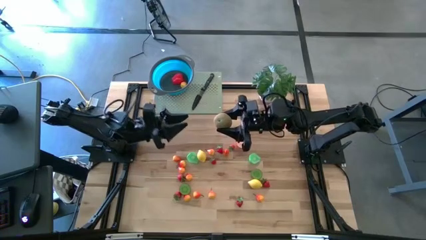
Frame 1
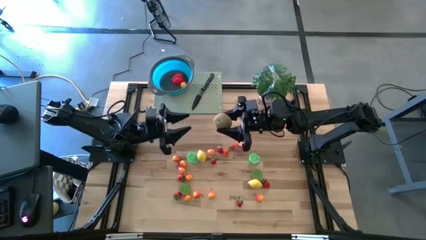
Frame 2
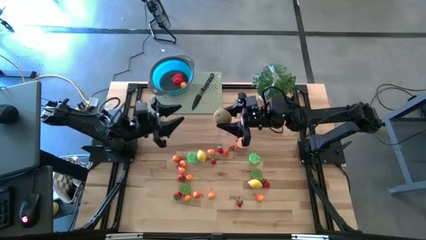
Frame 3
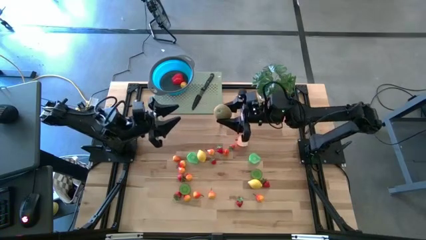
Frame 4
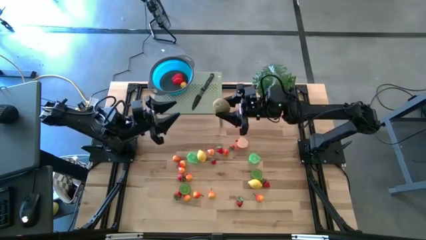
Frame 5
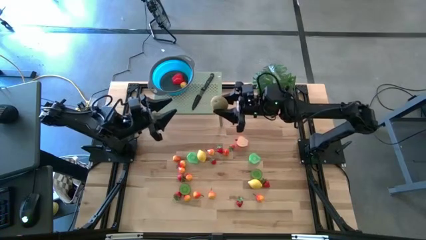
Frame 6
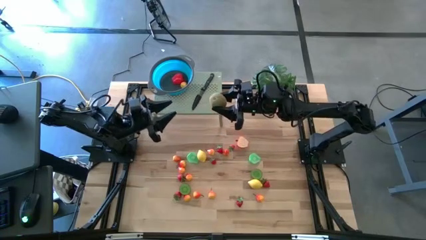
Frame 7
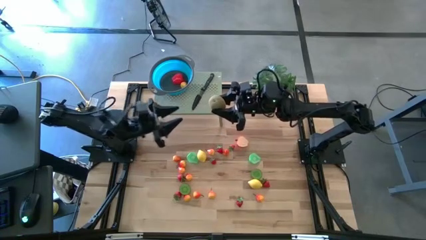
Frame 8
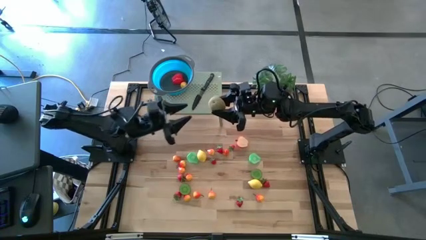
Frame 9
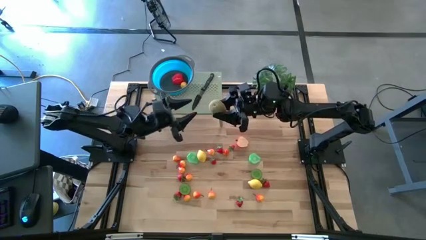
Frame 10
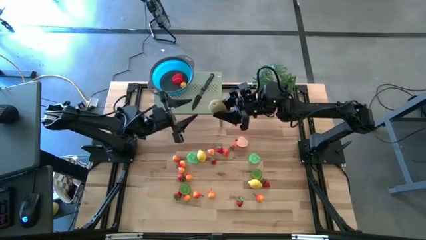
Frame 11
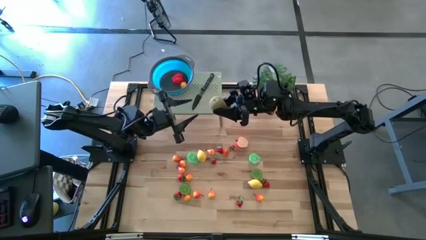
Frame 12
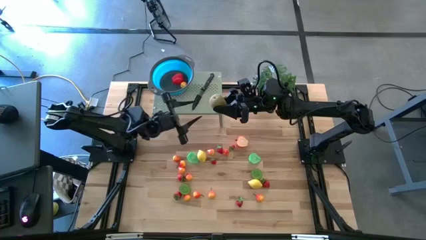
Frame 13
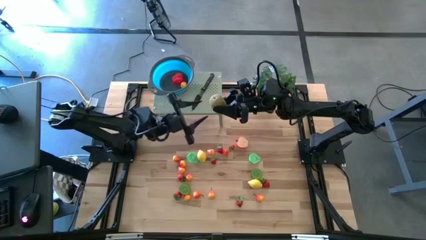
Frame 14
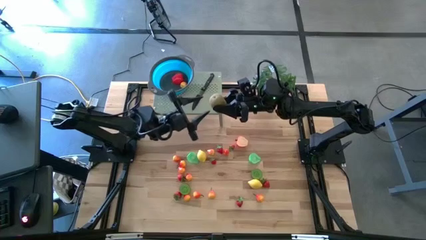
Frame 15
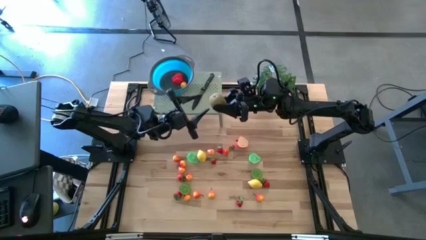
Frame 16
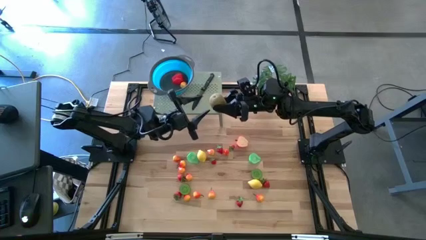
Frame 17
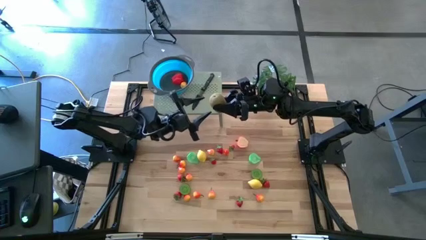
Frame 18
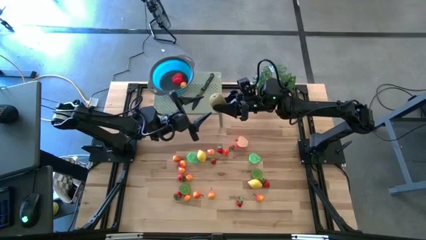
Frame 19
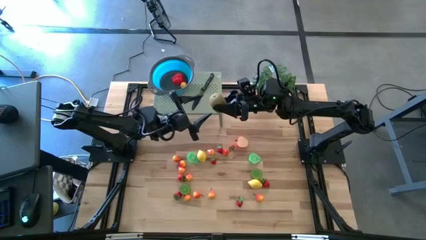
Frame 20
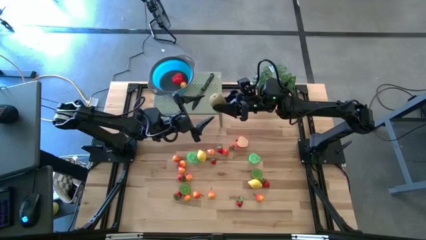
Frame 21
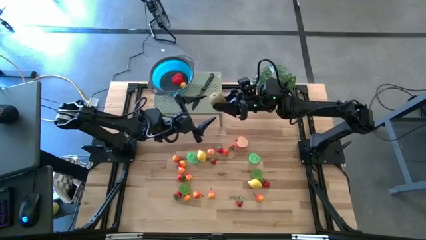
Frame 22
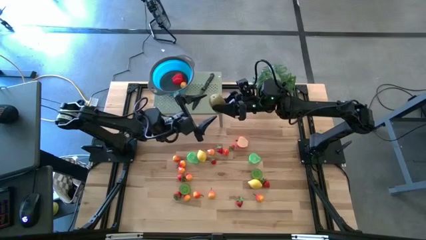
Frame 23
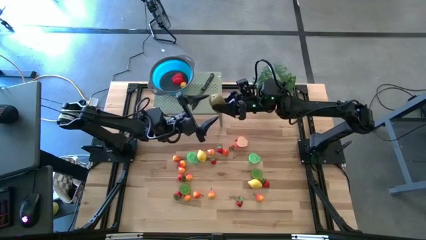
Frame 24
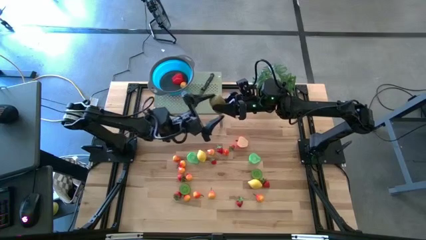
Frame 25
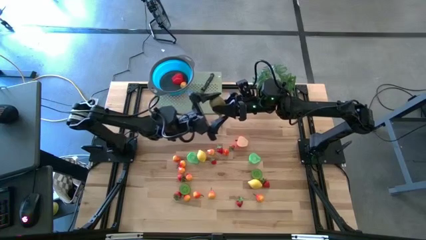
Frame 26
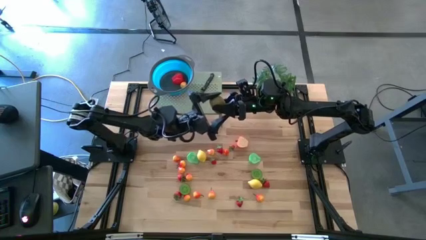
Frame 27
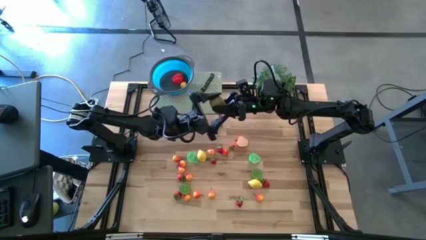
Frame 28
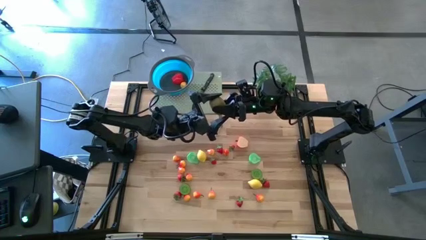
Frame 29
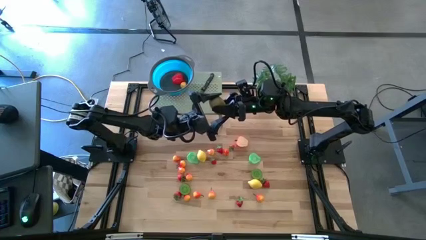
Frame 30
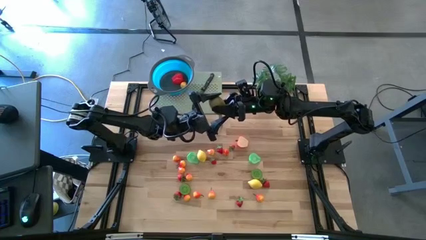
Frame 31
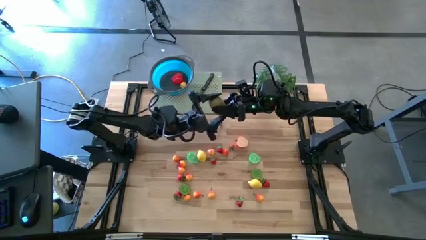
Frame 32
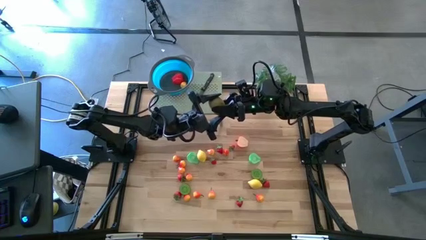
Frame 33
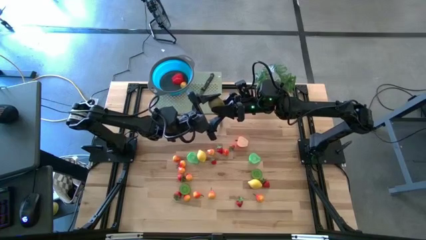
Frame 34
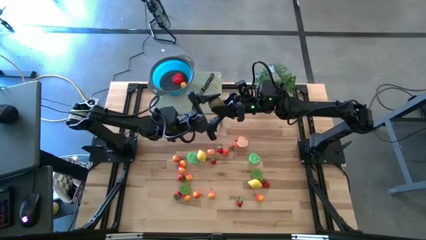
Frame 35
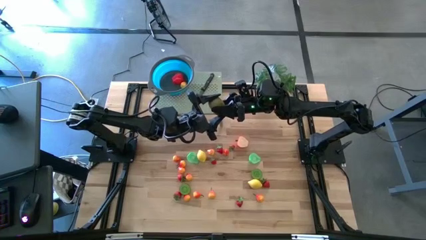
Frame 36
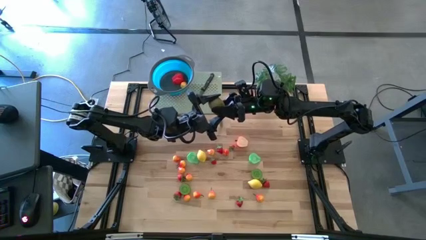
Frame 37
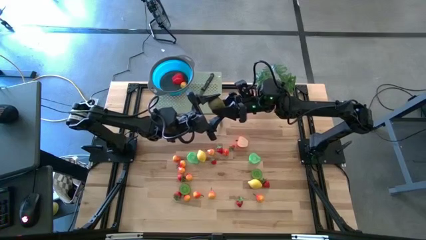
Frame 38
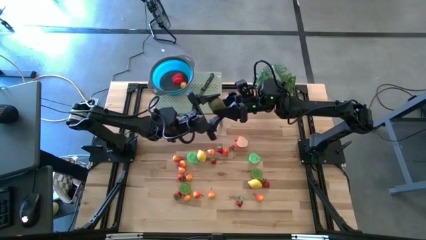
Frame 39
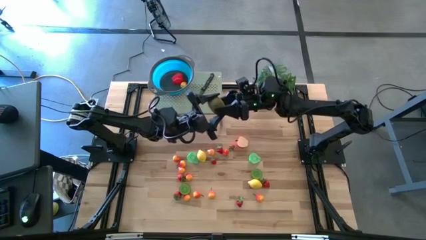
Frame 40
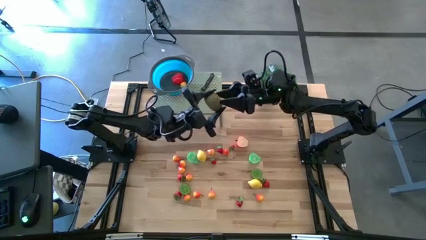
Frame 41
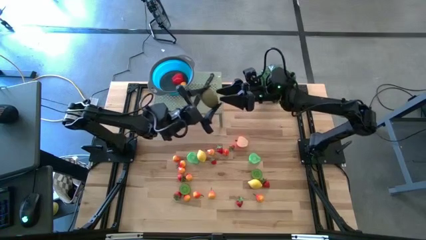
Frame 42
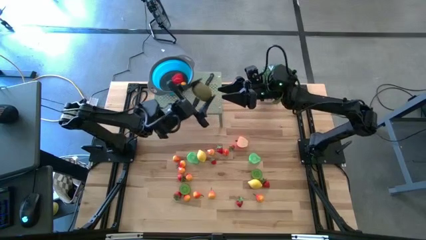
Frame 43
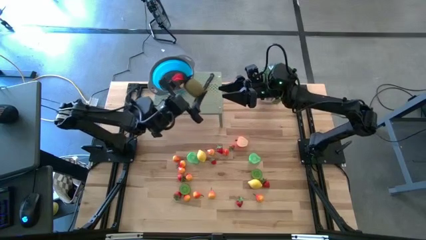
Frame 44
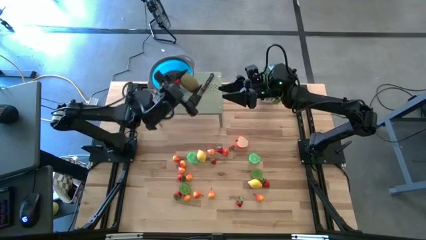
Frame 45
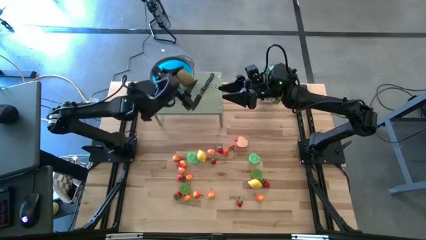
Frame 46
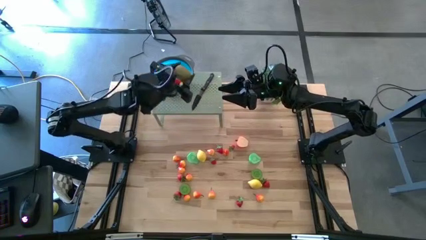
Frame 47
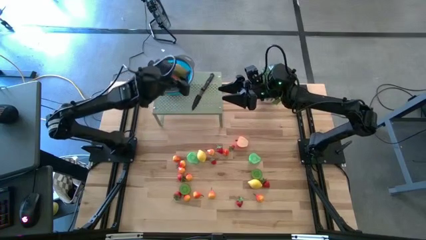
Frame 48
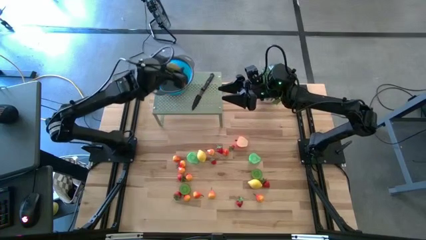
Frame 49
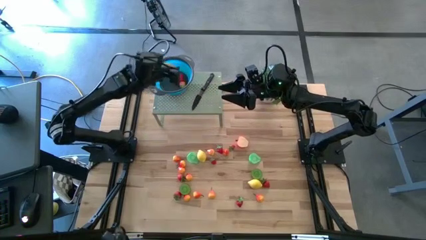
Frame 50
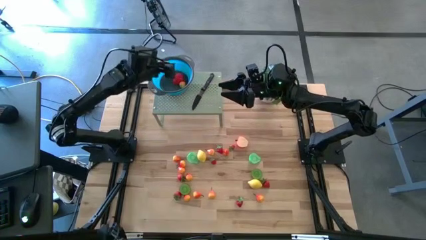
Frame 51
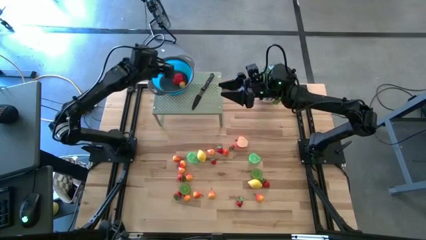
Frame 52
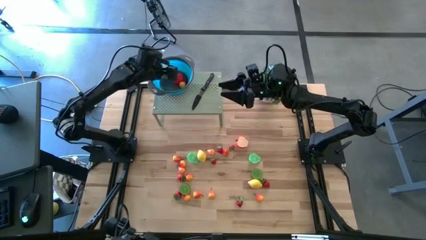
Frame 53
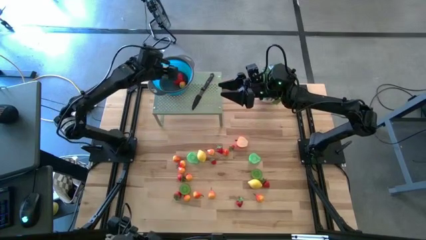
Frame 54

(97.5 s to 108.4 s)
Task: Pick & Place Fruit
Put the kiwi into the strainer bowl on the shelf

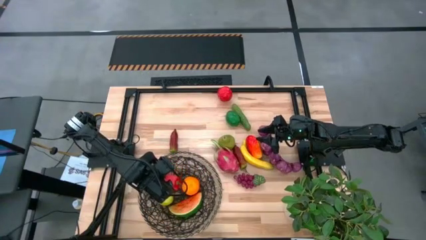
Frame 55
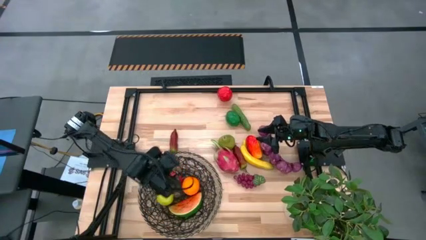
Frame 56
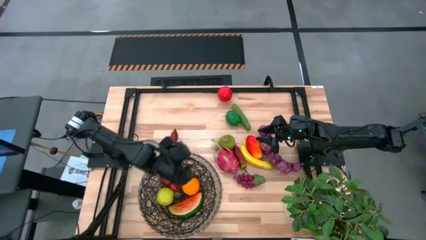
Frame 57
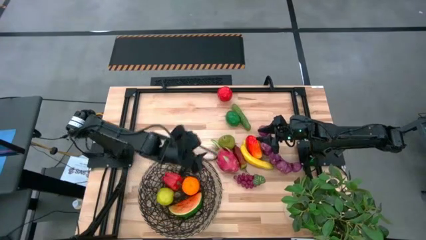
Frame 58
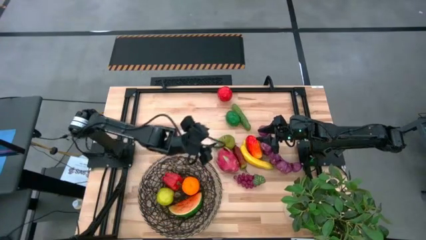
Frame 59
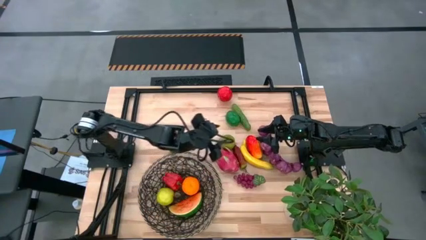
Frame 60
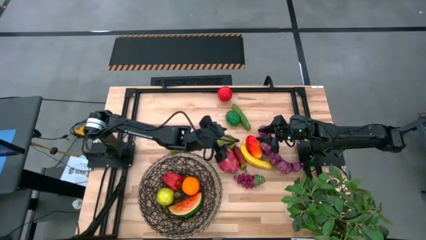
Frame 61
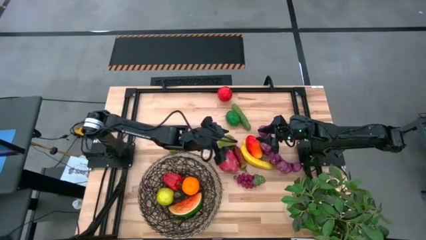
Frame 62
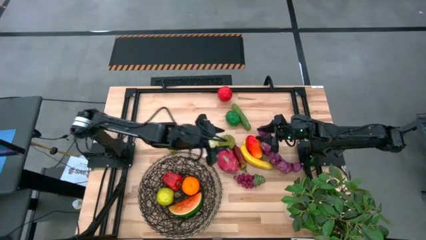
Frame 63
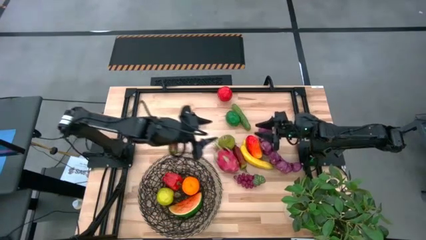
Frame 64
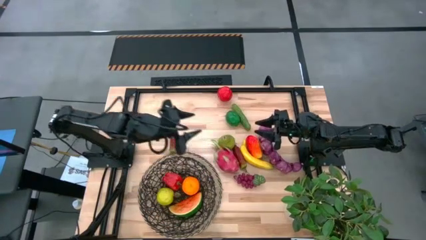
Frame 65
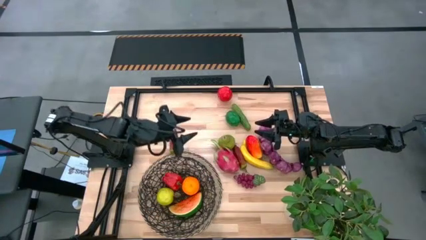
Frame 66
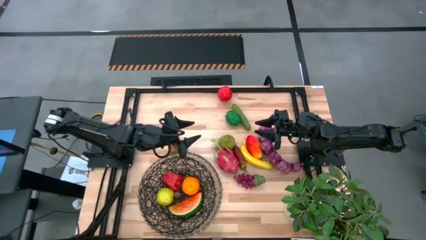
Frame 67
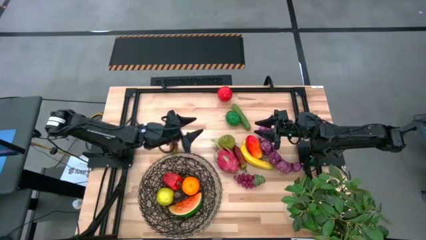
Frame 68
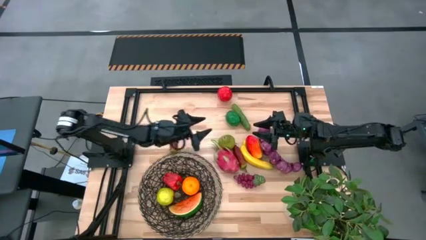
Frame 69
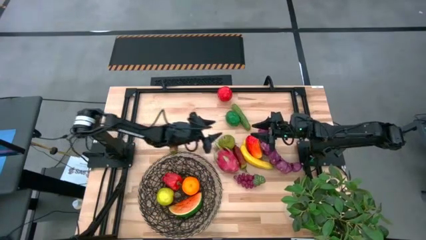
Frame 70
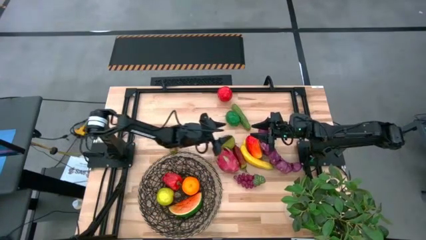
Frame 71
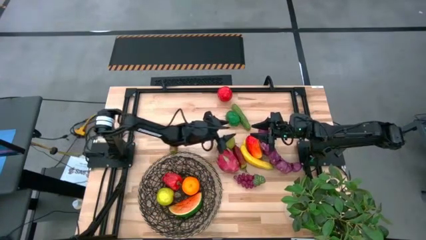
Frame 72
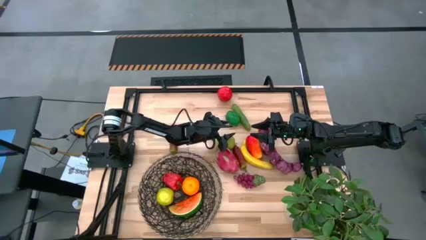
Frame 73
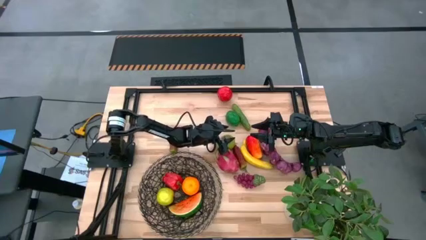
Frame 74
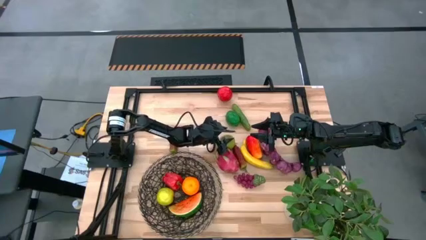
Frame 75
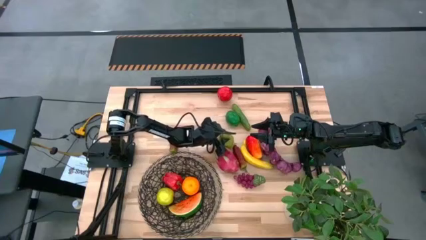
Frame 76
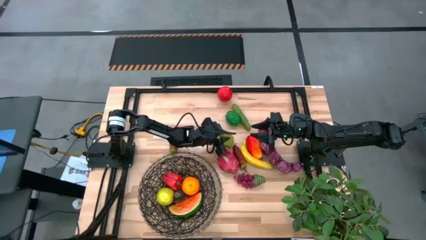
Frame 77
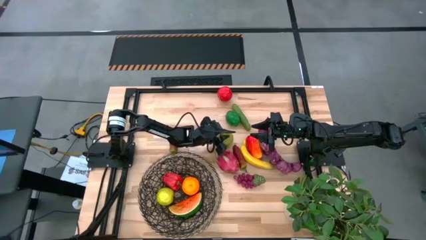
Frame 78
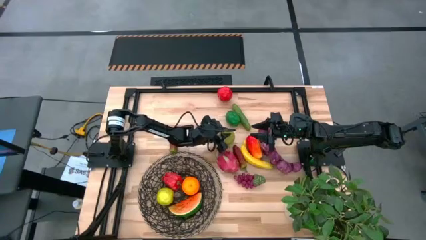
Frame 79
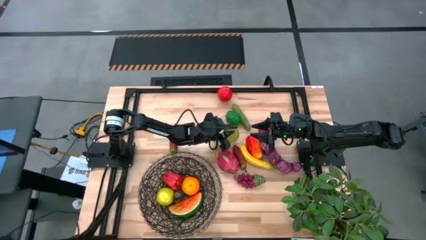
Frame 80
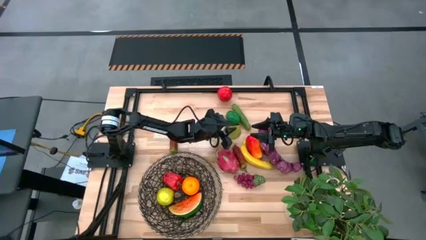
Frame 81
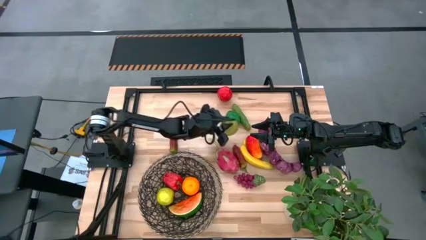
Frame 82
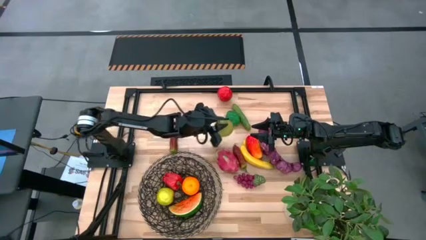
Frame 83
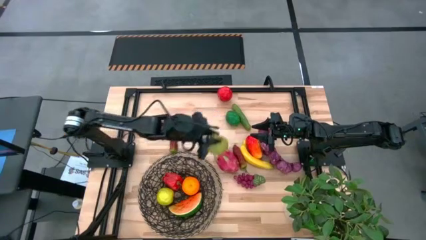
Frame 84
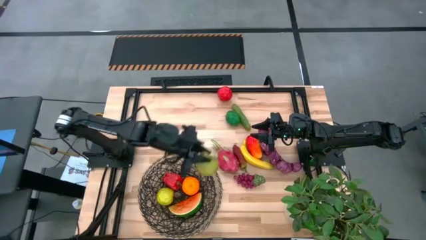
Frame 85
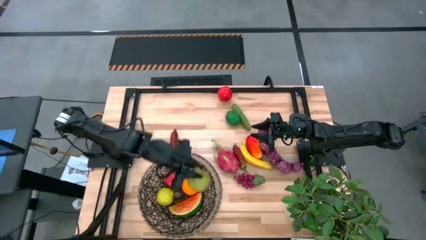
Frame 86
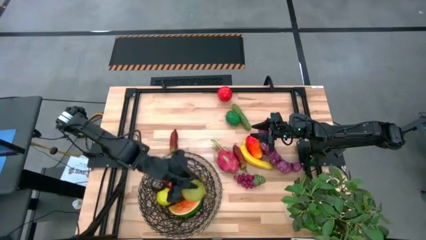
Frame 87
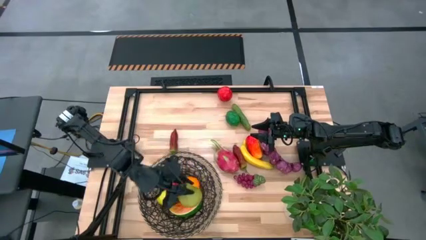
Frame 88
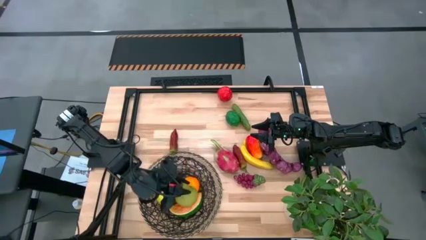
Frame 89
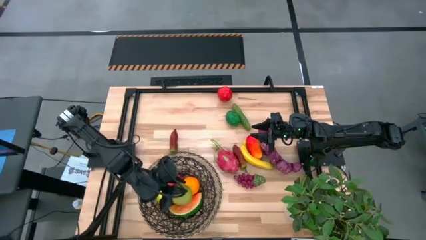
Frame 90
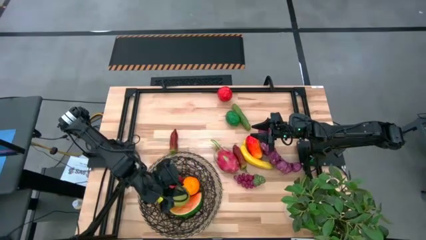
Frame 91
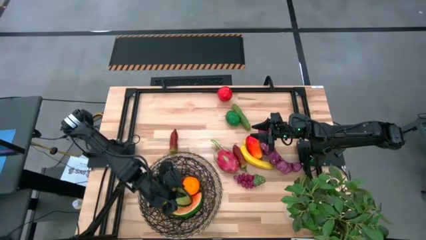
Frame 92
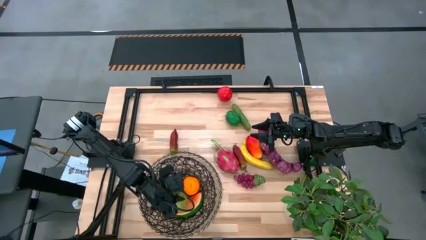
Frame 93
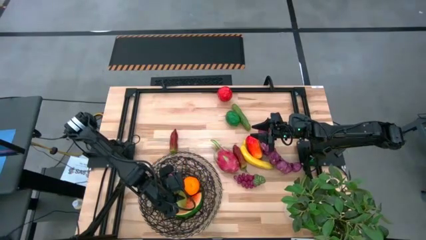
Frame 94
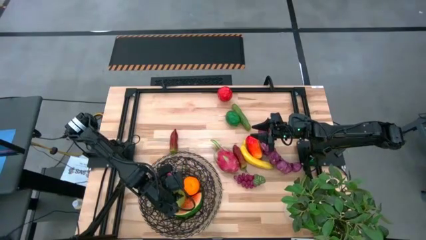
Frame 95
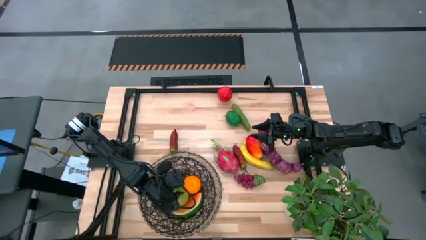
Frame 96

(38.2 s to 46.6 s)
Task: Build produce basket
Put the pear into the woven basket
